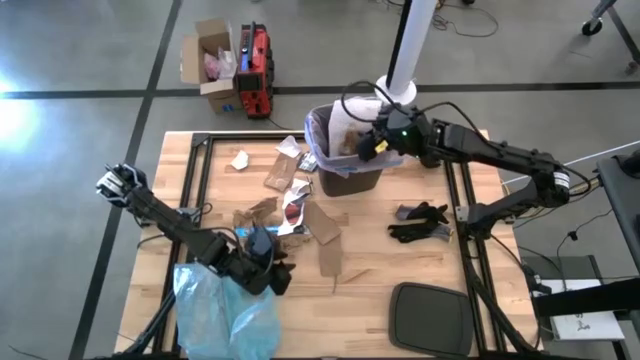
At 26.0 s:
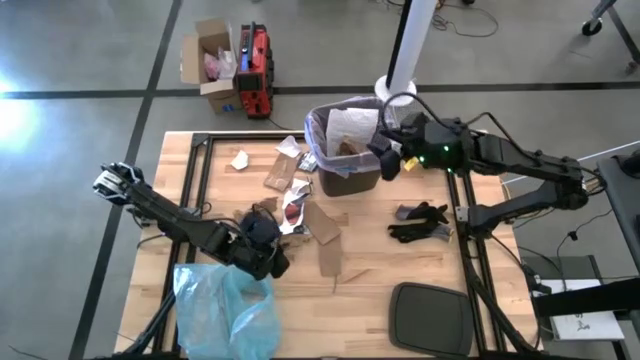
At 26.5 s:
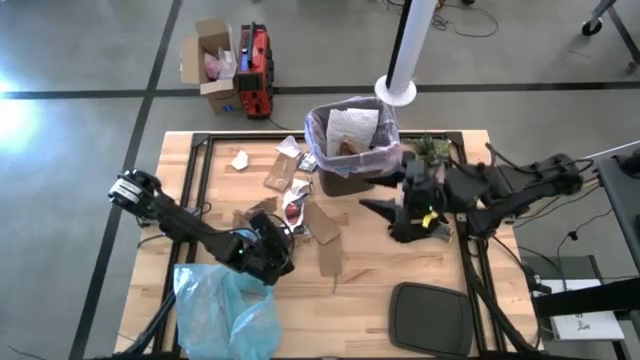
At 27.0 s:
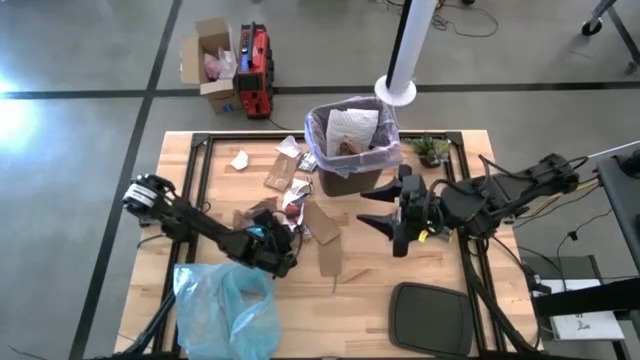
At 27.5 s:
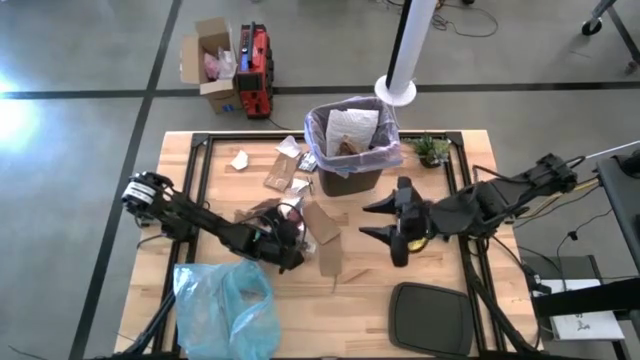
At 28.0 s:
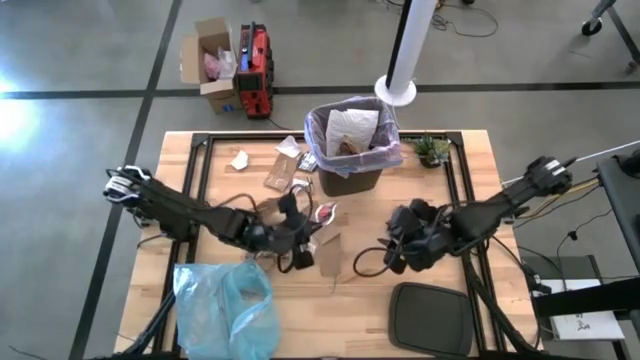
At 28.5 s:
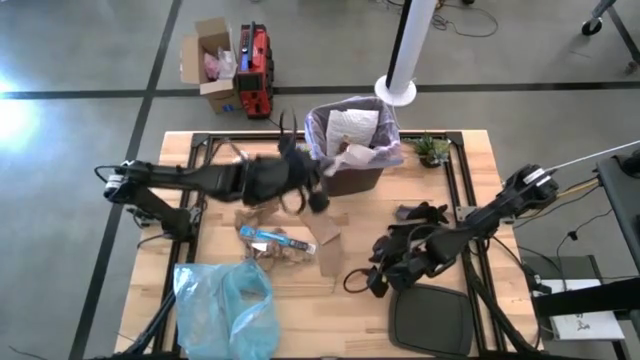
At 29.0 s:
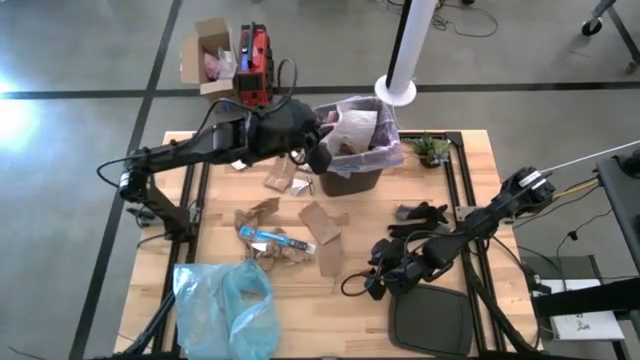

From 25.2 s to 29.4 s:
Task: place trash/remove bag and relplace
Put the white paper into the trash bin

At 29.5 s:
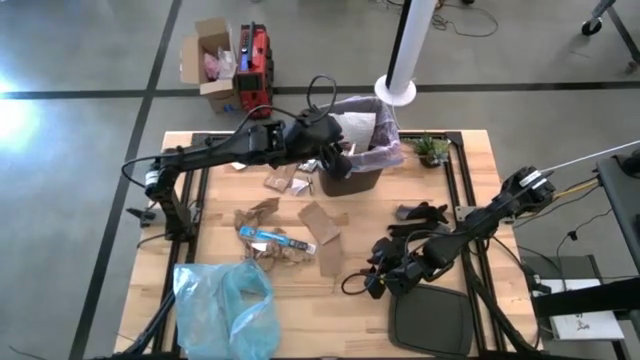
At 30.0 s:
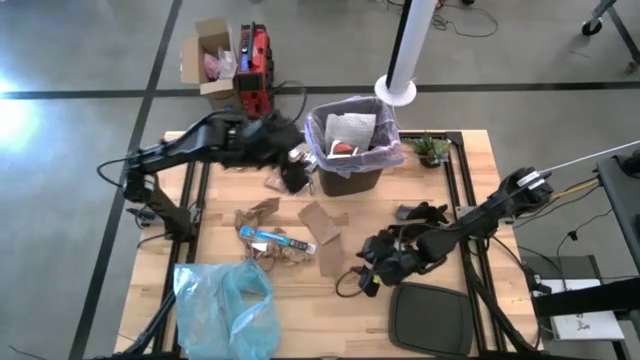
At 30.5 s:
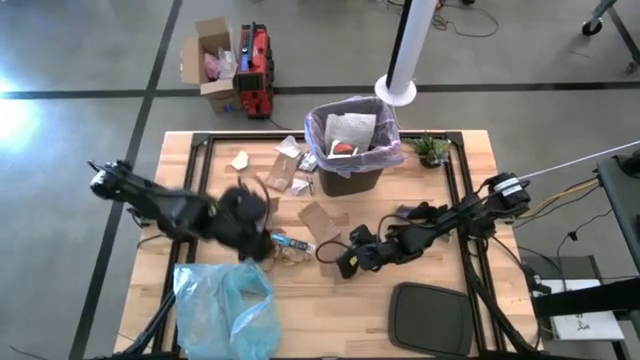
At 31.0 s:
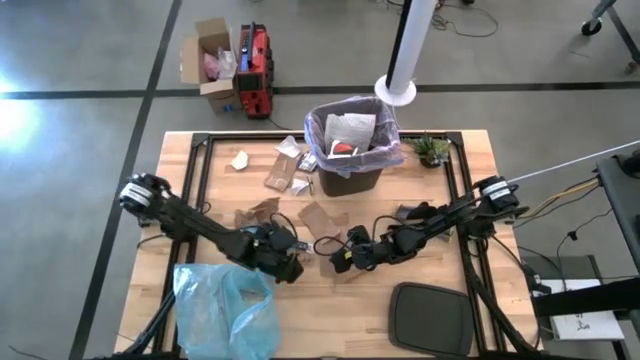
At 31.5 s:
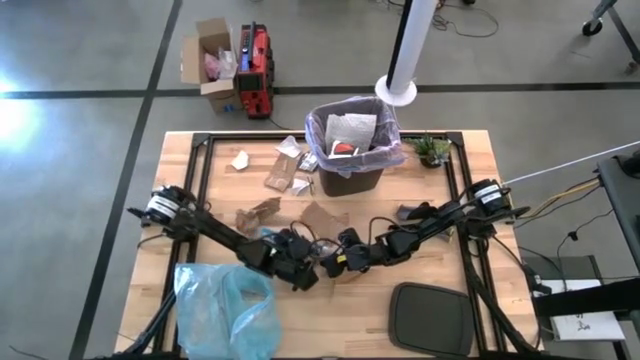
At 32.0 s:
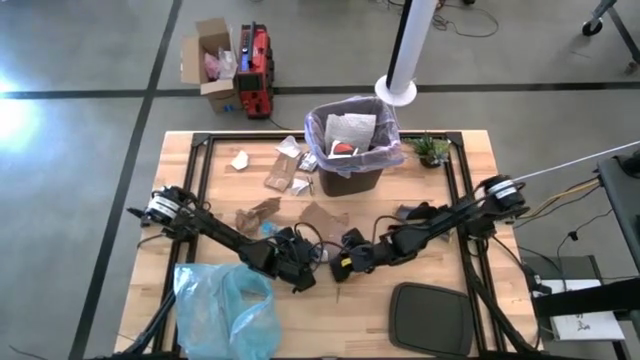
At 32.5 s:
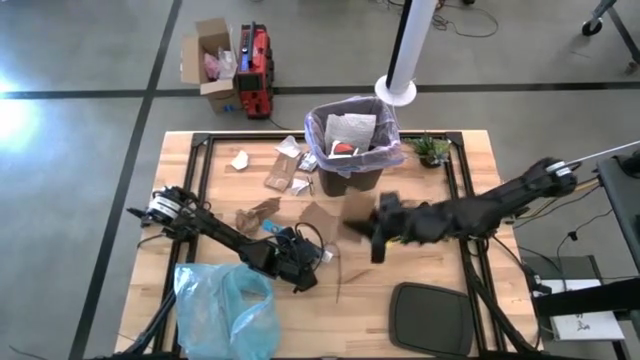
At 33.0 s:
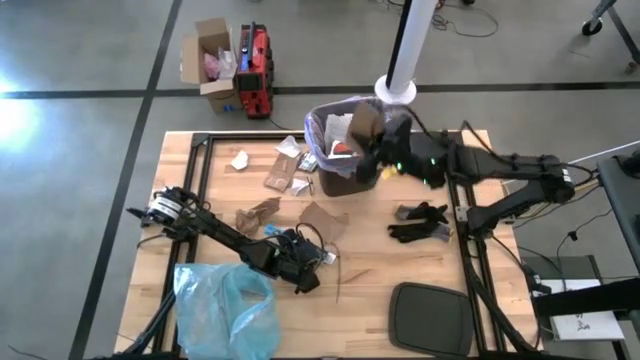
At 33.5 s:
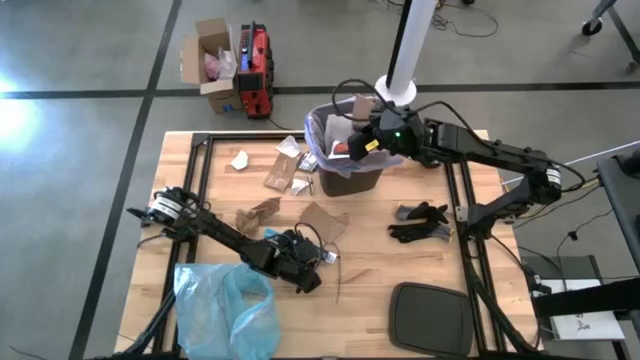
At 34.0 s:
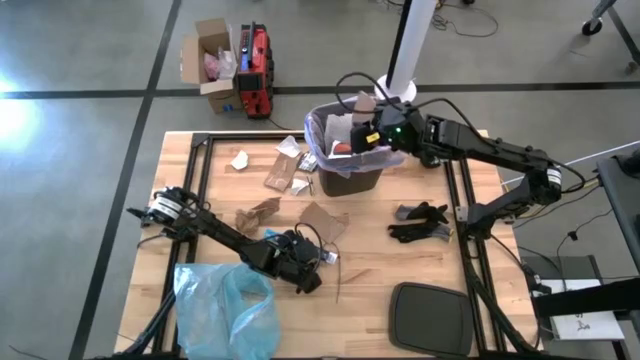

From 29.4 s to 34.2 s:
Put the cardboard into the trash bin

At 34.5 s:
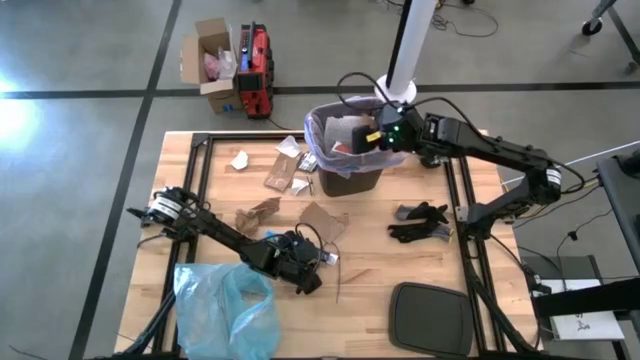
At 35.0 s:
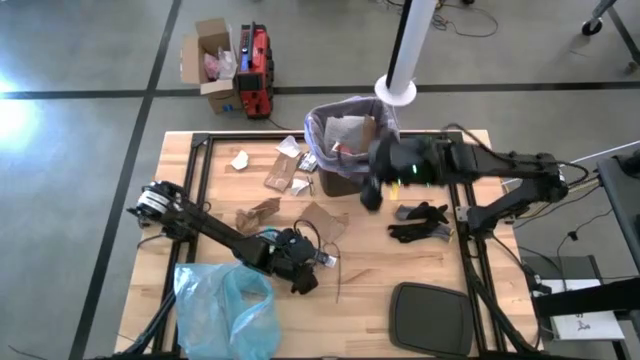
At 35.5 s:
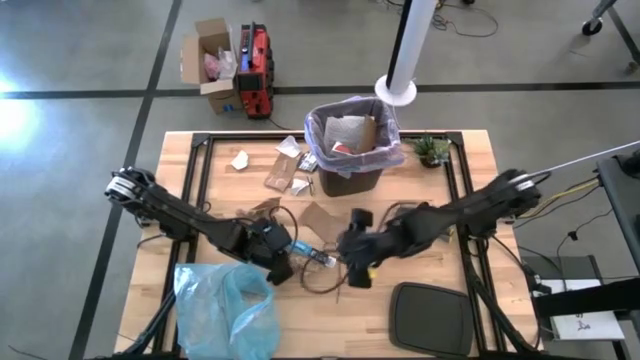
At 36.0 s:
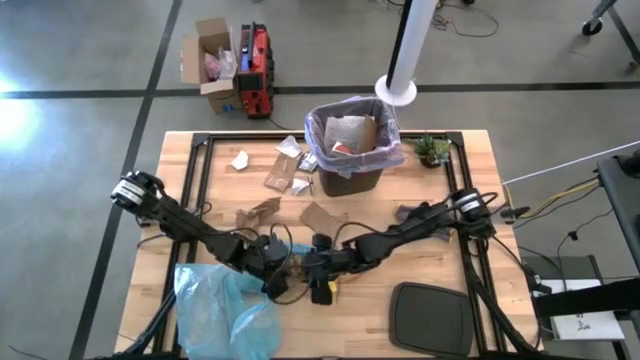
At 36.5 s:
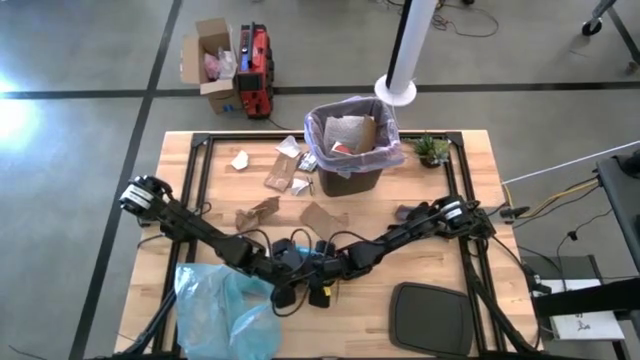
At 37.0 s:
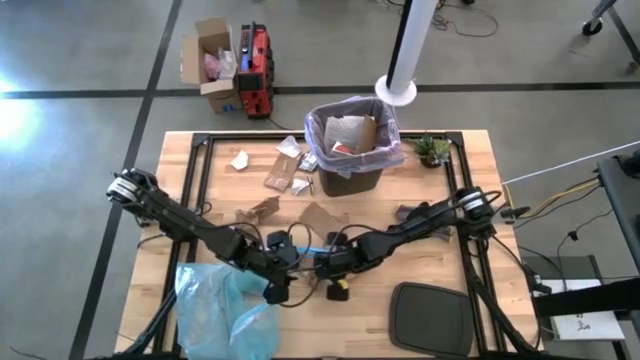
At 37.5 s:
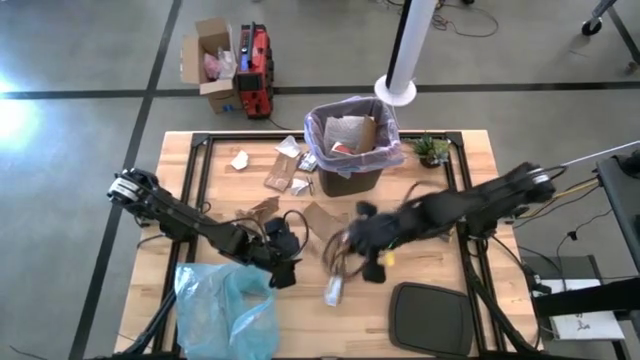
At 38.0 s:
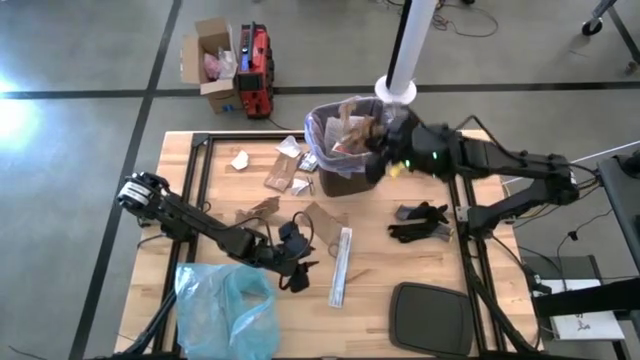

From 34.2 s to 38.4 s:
Put the brown paper napkin into the trash bin

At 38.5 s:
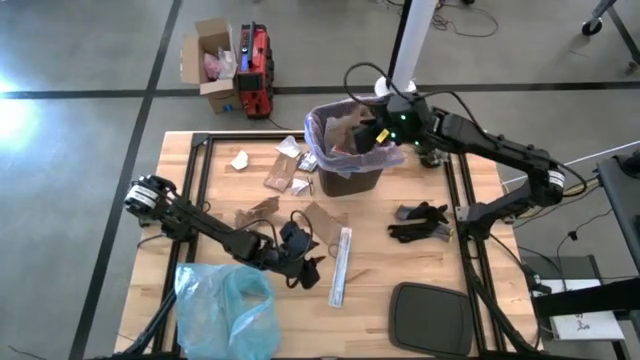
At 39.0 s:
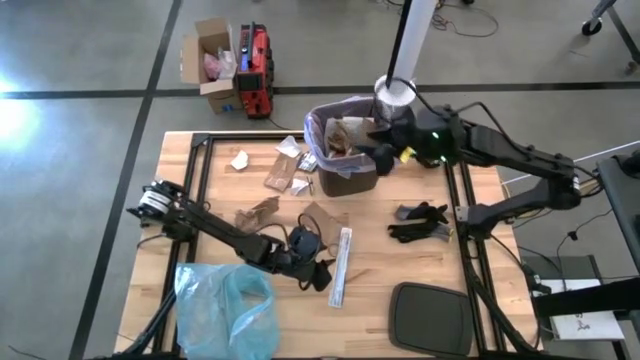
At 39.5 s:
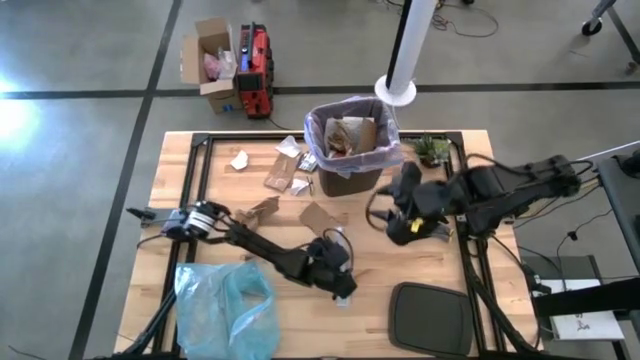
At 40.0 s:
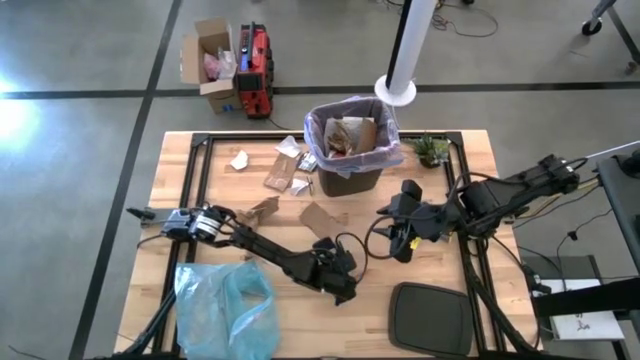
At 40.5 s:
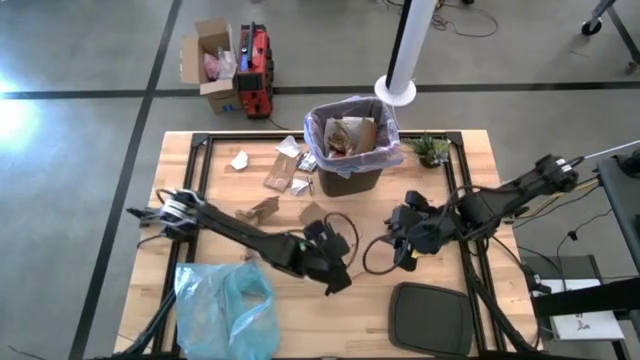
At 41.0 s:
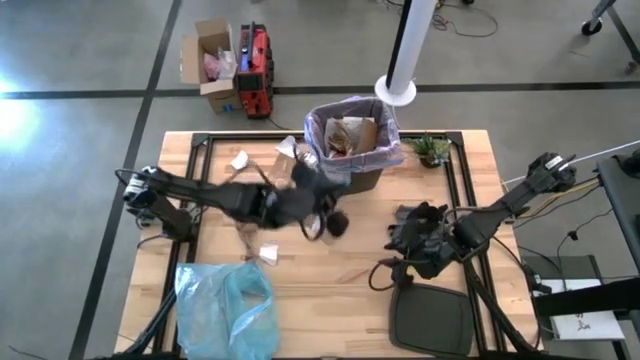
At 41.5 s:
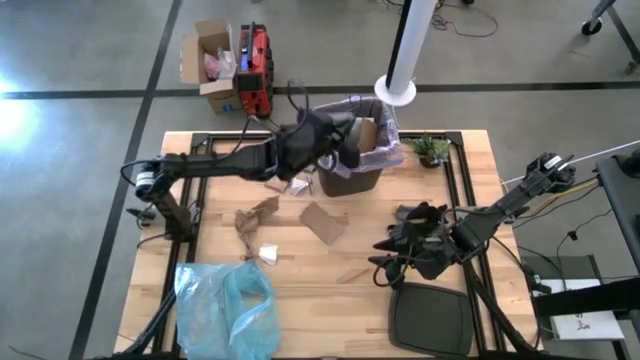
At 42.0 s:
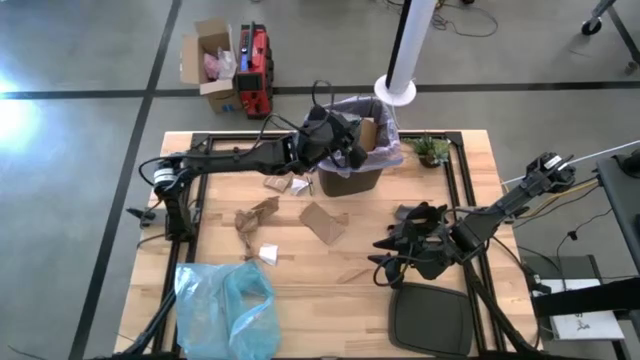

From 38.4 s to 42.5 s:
Put the cable tie and blue plastic cellophane into the trash bin

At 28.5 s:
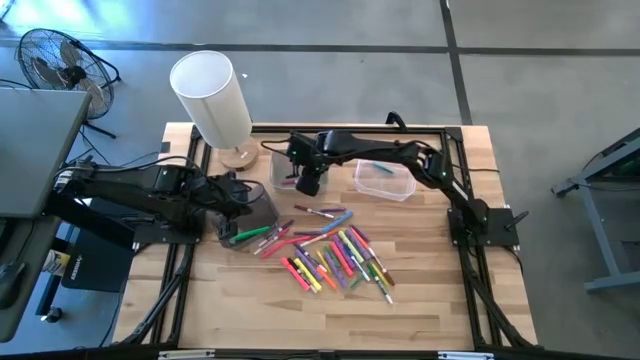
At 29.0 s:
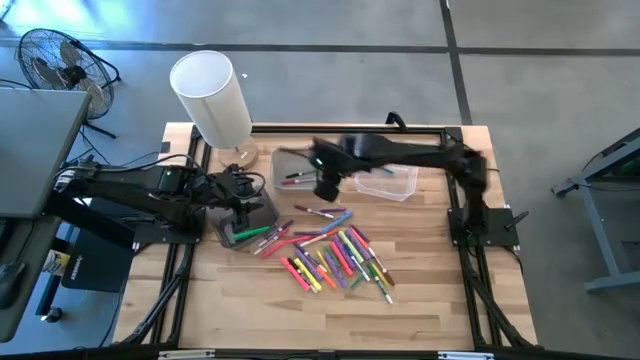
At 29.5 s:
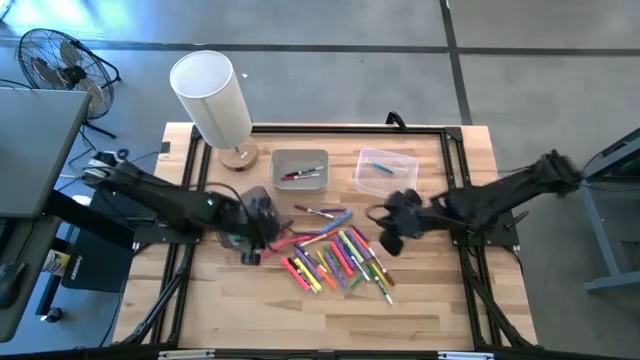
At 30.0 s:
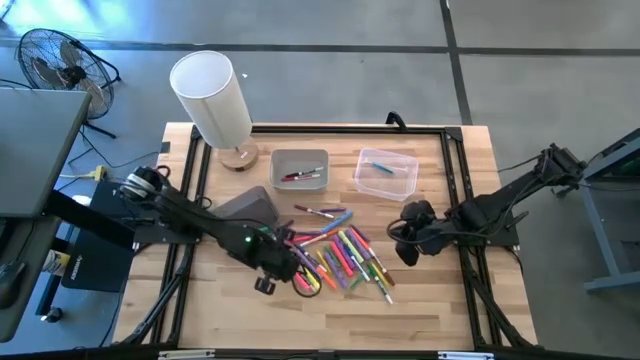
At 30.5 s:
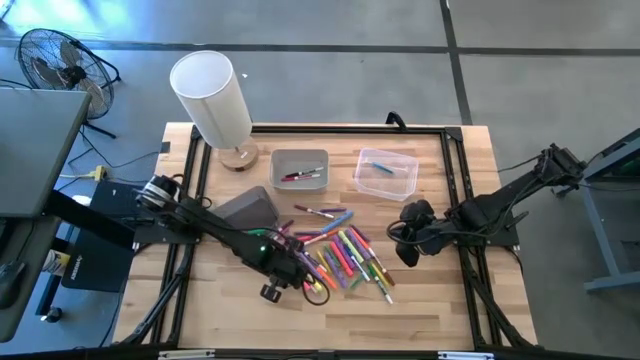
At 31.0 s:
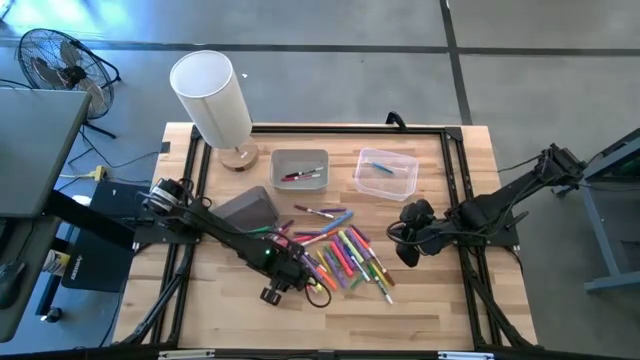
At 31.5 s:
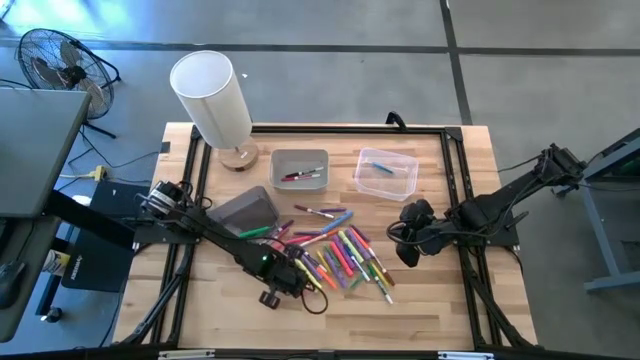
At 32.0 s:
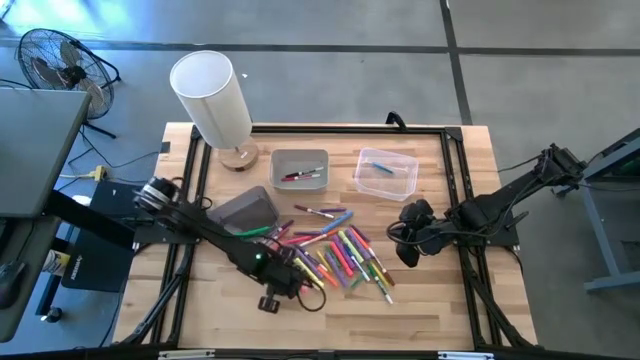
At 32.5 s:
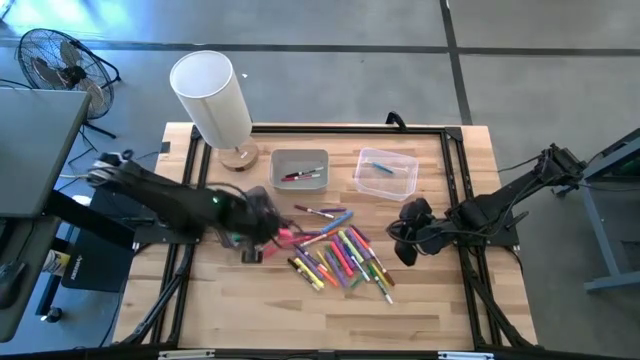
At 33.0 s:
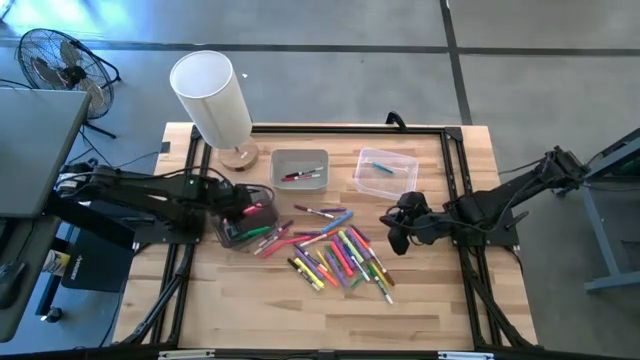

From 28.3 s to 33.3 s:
Task: Pick & Place Markers
Put the pink highlighter pen into the black bin
